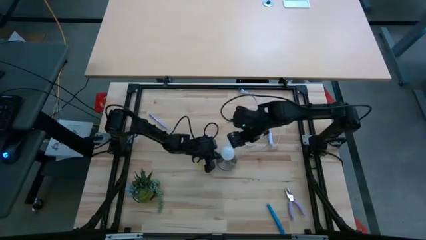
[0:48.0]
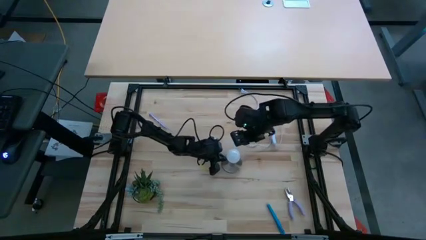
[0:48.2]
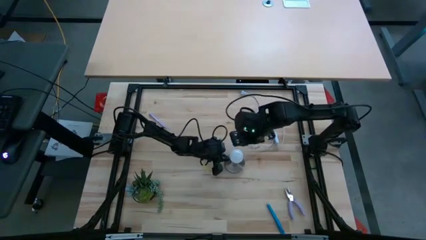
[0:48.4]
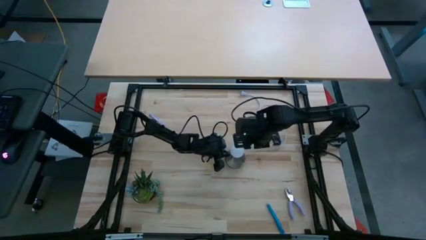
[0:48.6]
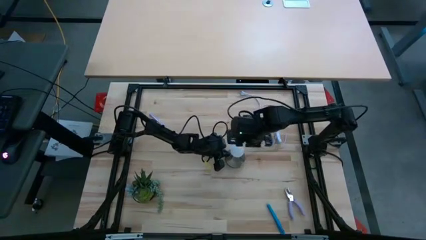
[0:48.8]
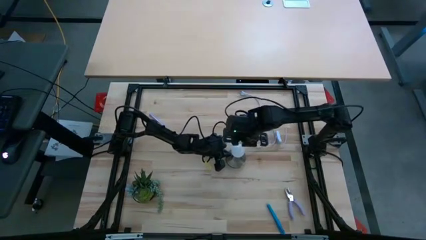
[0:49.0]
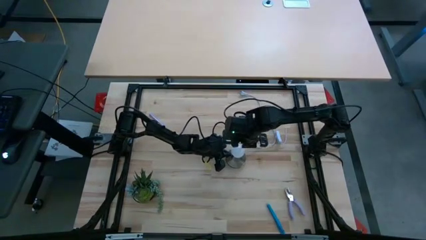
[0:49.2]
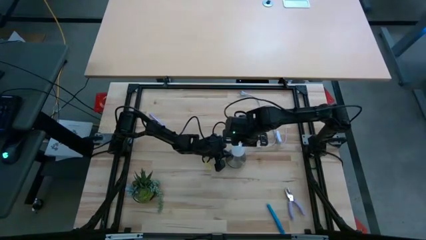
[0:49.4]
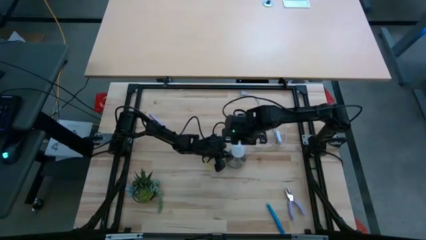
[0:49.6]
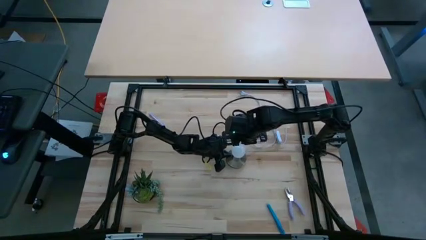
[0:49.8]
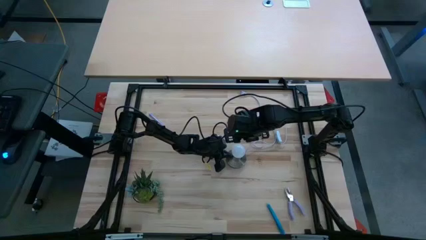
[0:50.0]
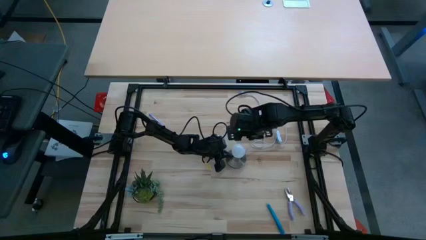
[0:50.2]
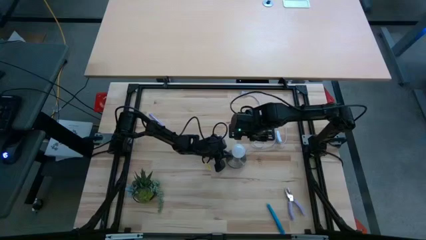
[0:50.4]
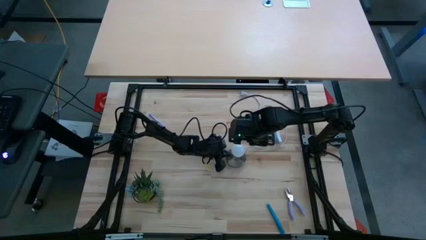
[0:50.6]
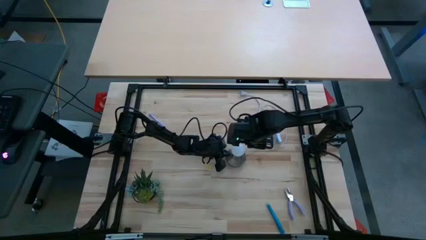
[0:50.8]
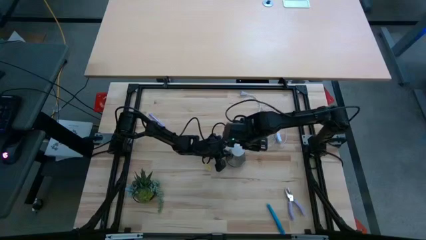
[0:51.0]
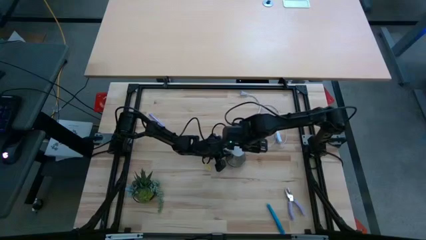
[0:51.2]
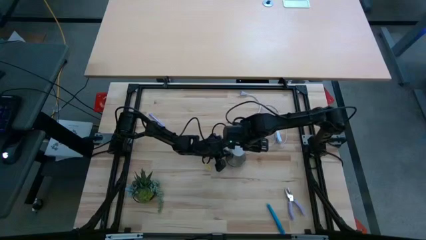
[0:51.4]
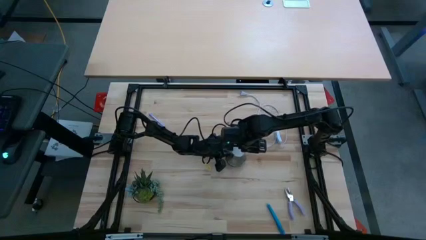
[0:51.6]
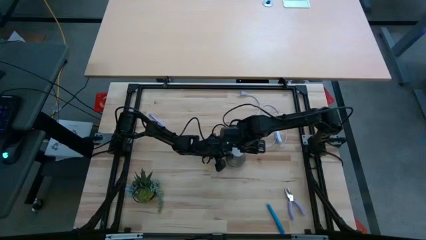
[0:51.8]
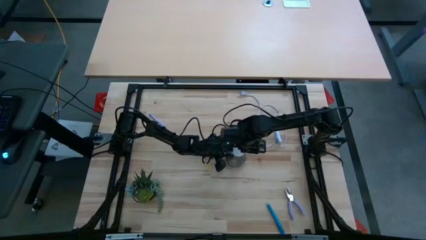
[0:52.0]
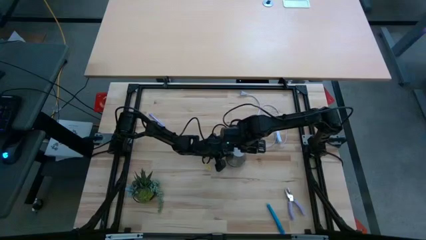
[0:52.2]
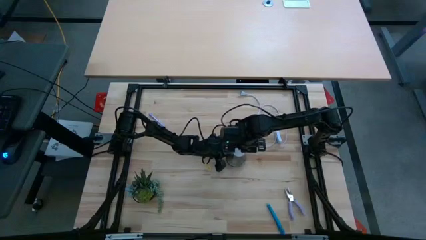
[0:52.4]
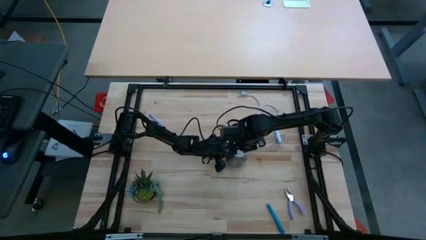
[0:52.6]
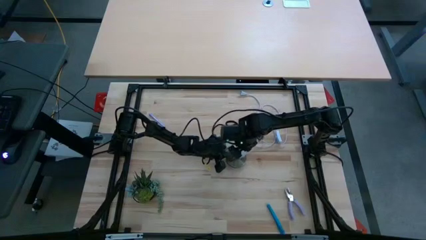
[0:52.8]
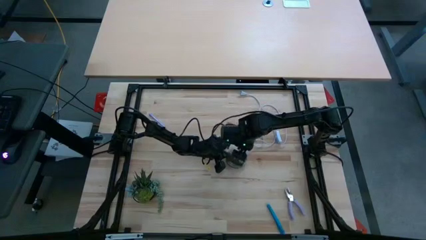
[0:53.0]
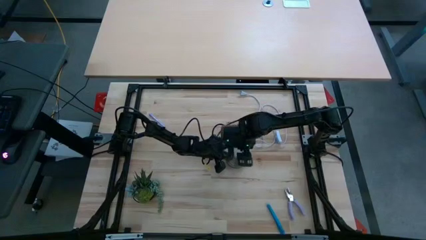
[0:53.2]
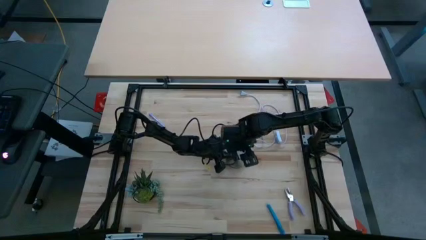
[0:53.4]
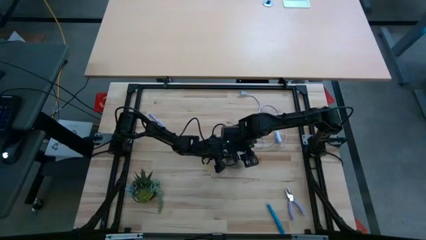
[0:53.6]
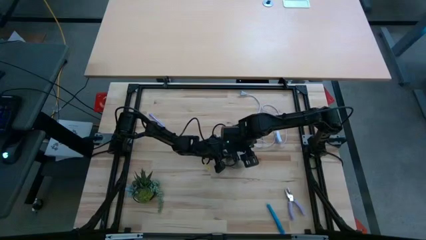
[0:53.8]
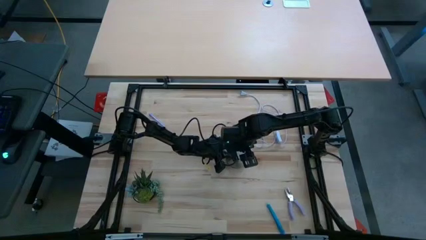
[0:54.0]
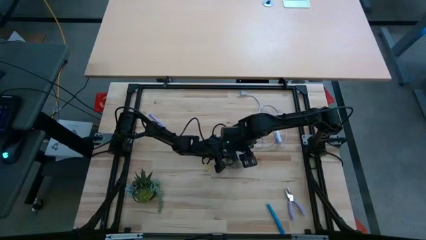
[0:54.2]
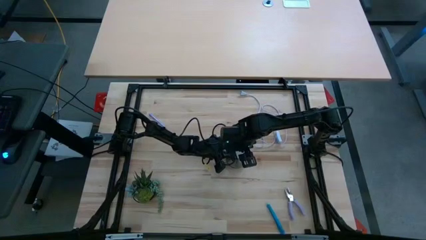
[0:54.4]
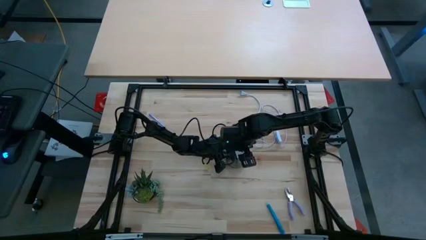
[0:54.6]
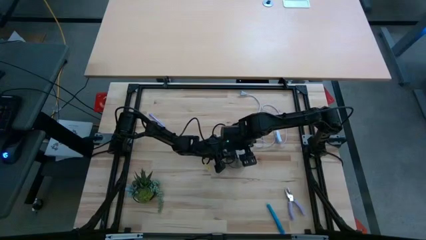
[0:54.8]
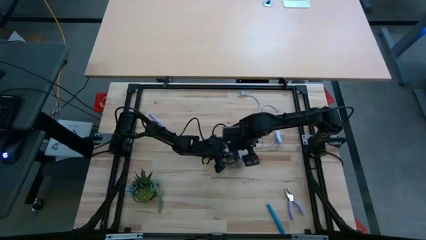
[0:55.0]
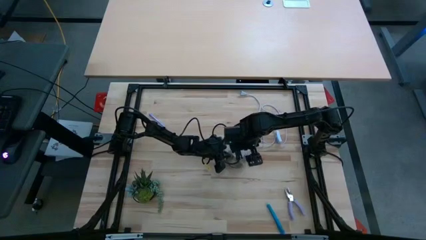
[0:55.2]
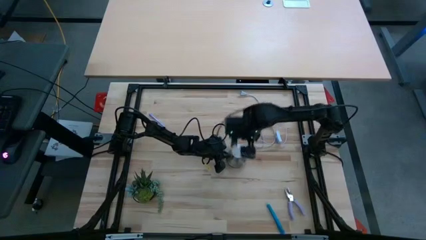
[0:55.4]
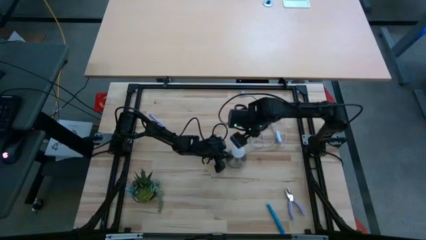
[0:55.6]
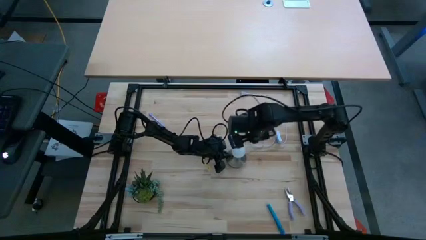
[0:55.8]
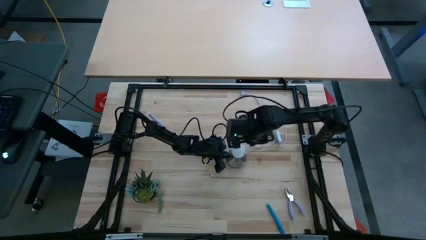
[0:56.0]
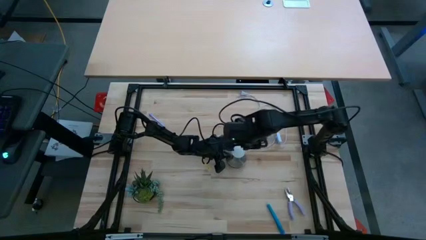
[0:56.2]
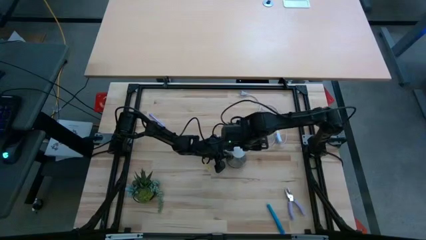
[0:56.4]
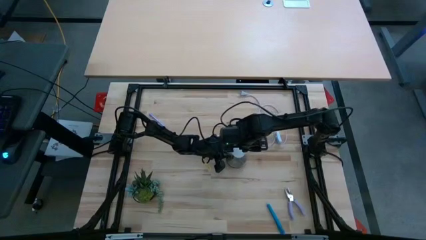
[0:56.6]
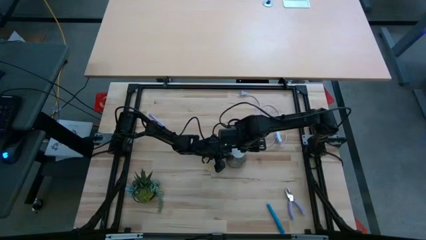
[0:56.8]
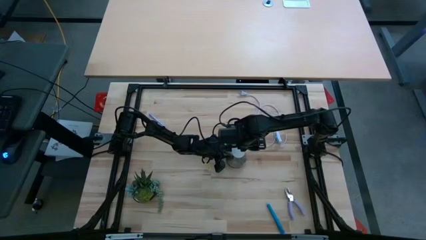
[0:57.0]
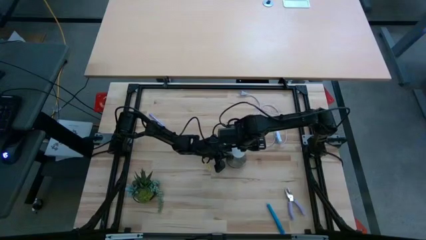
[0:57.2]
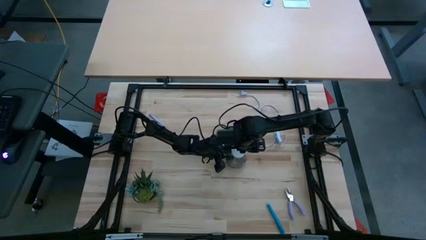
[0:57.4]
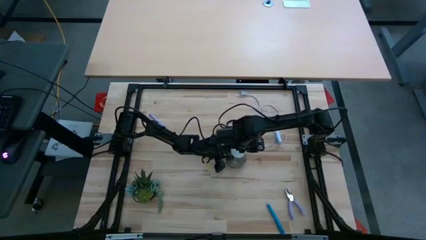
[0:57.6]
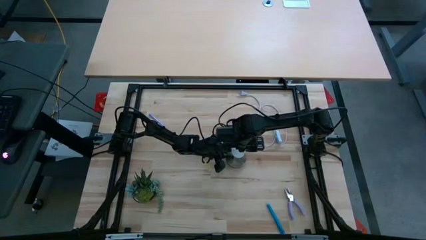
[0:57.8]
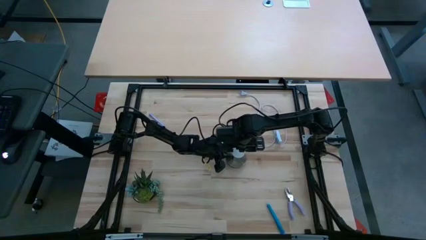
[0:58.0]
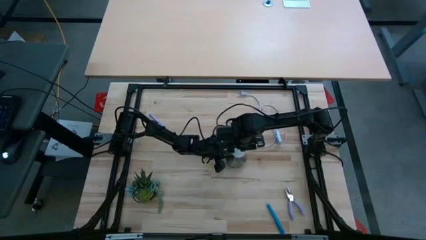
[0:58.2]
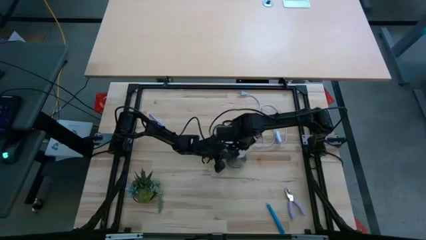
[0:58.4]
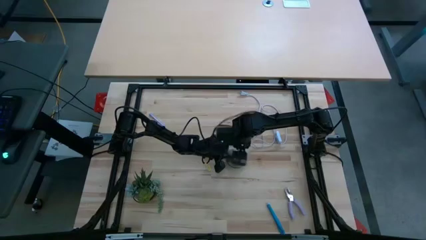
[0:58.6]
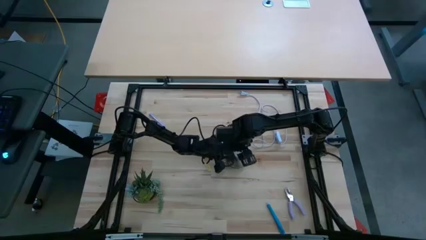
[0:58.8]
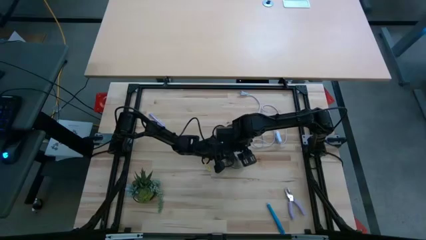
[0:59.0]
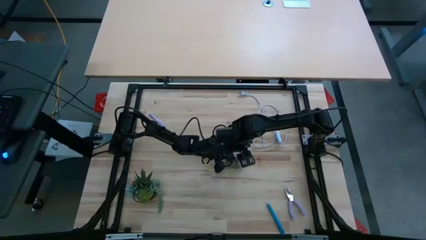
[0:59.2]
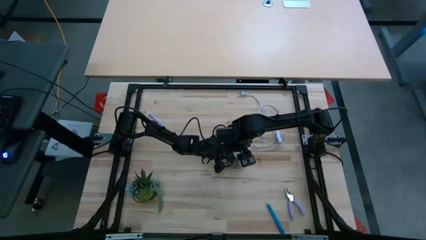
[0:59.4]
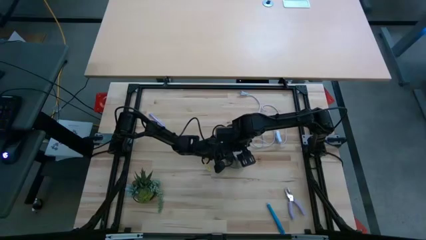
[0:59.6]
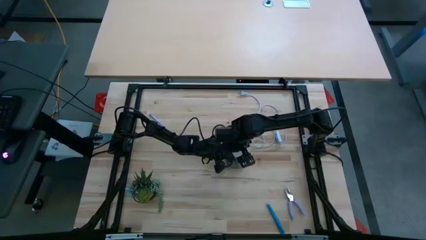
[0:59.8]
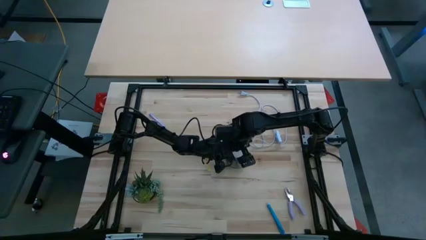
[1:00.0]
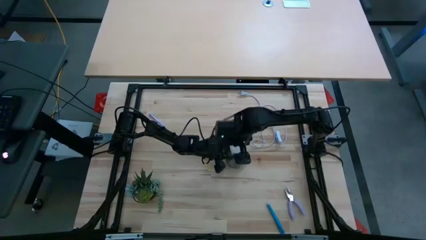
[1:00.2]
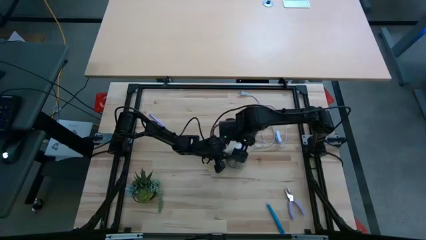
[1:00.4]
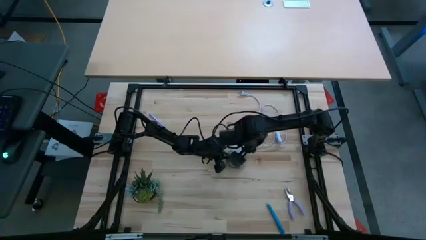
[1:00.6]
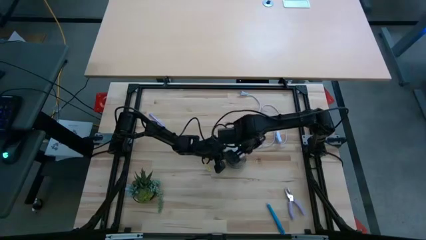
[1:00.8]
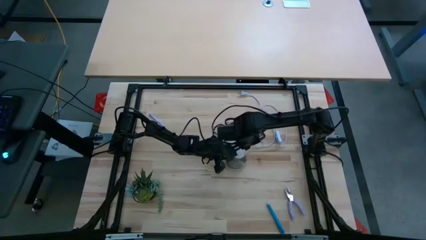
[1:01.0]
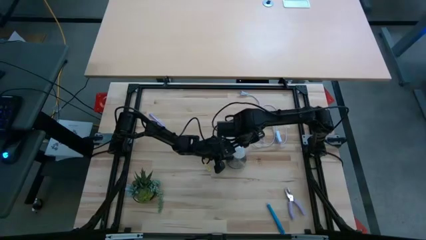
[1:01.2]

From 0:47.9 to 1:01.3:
Task: Screw lightbulb
Remove the lightbulb from the lamp

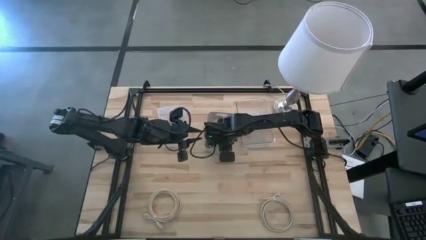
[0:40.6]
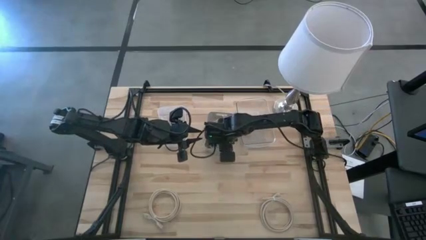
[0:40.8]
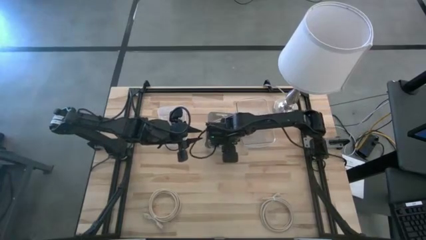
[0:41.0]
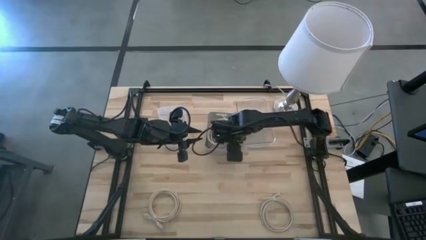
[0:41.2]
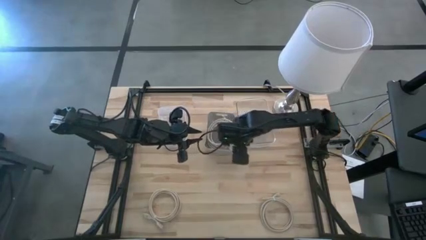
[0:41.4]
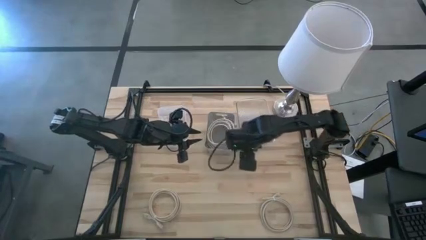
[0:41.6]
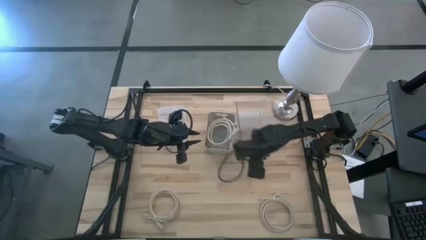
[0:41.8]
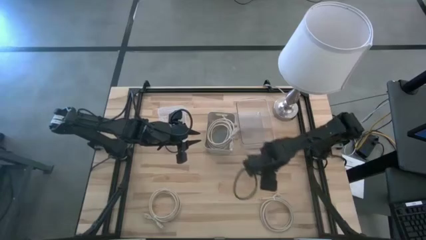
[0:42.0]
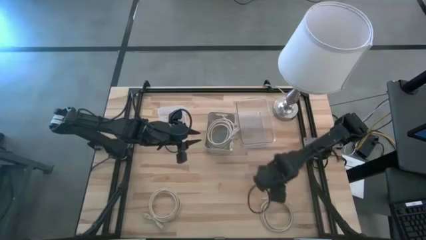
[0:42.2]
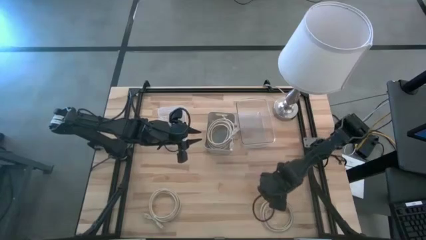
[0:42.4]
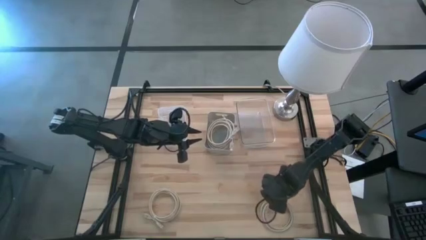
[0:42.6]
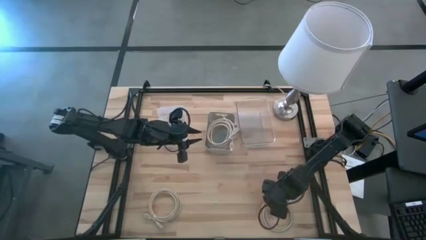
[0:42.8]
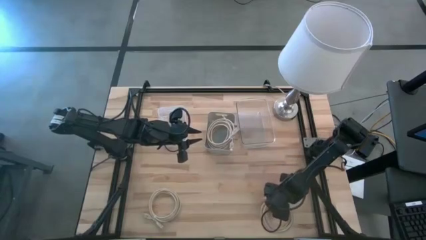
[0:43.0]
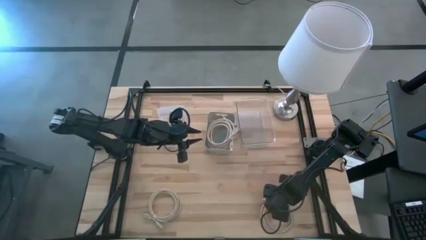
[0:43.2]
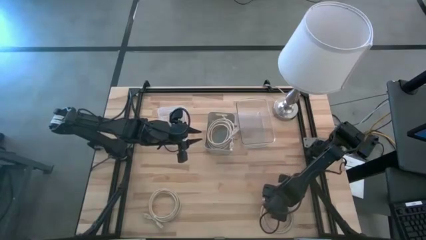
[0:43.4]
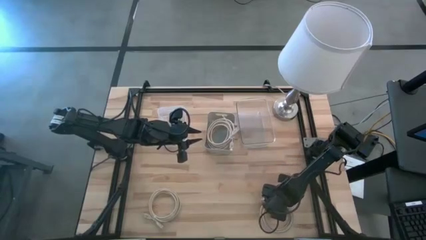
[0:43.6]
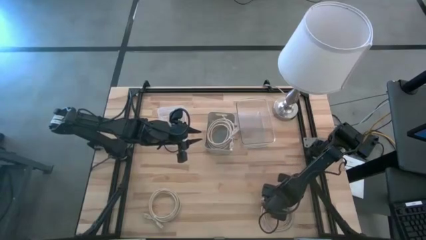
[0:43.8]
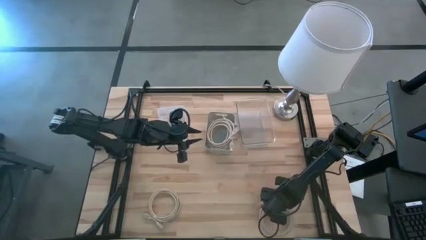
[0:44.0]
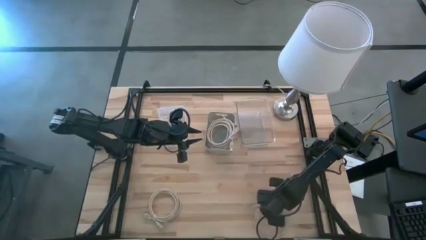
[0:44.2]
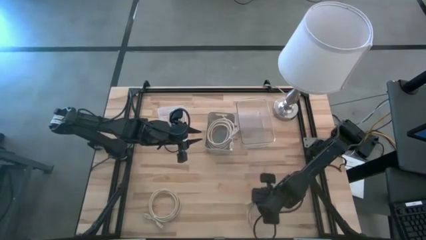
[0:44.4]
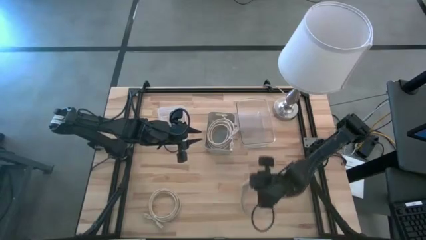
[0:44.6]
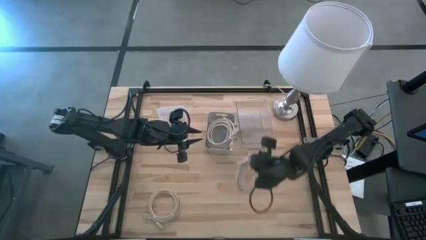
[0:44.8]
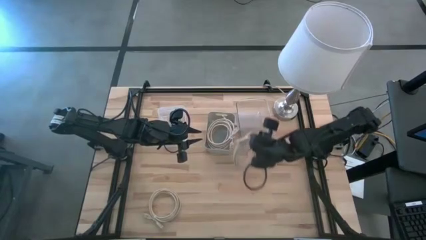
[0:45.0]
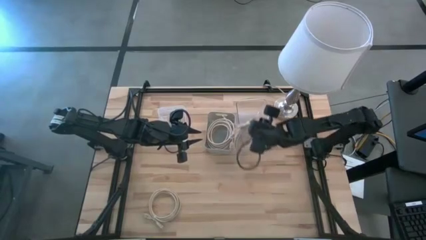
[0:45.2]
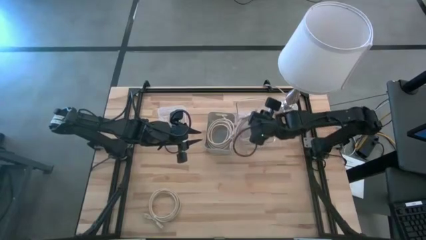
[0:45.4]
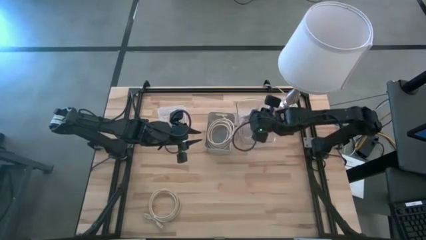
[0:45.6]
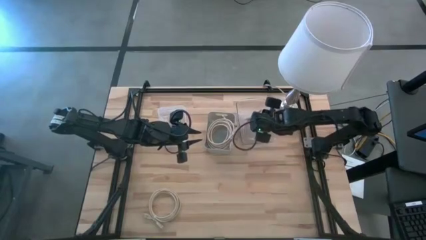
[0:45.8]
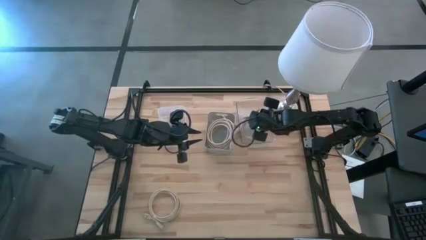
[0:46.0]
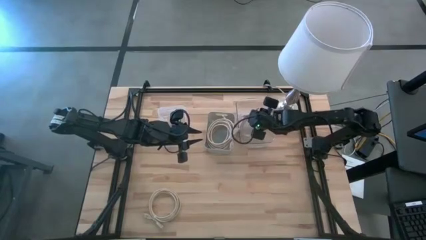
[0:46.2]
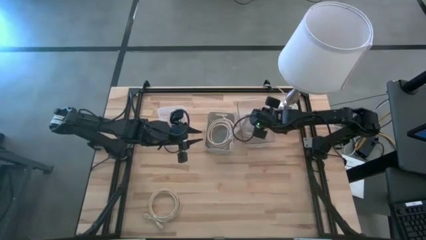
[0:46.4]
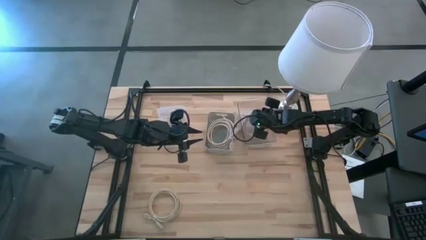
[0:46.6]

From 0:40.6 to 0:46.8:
Task: Pick & Place USB Port
Put the brown hdmi cable into the right transparent bin
